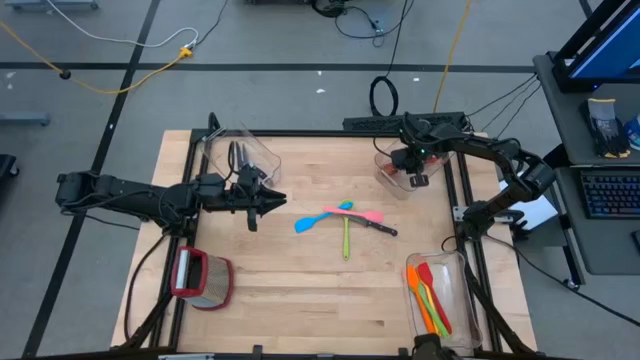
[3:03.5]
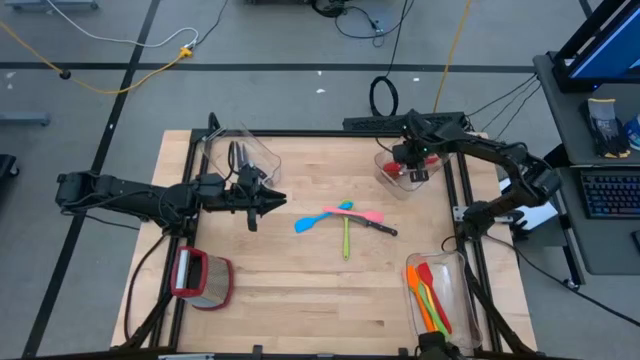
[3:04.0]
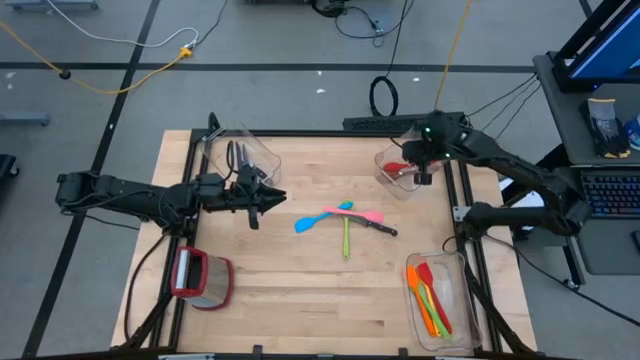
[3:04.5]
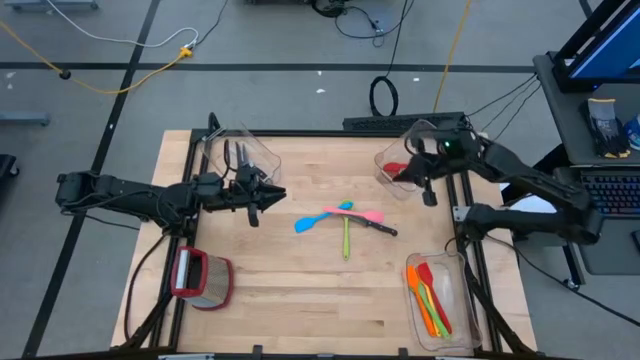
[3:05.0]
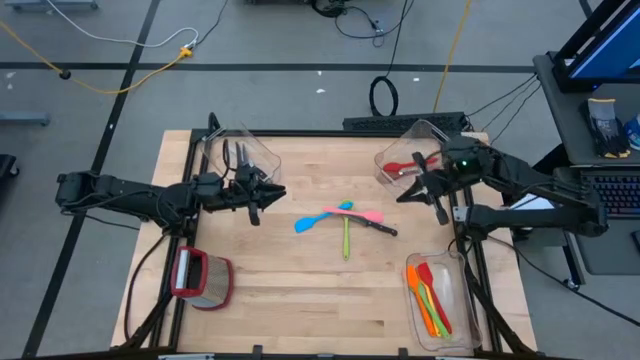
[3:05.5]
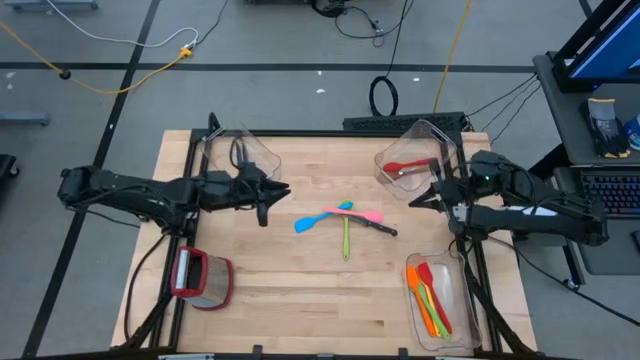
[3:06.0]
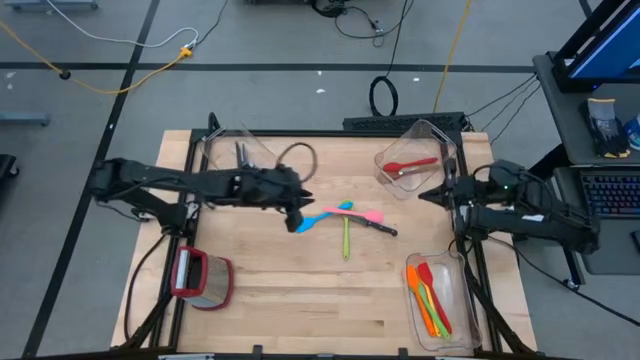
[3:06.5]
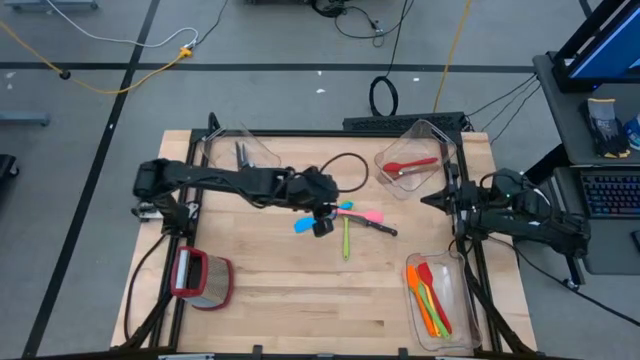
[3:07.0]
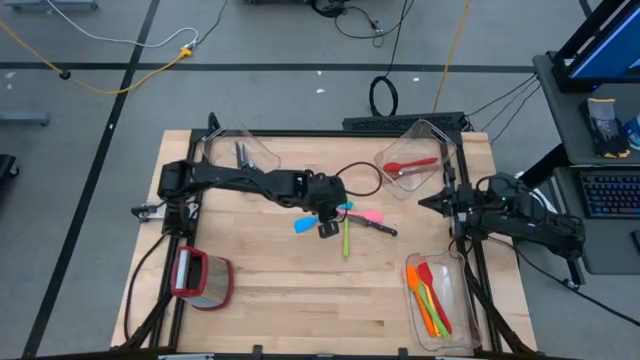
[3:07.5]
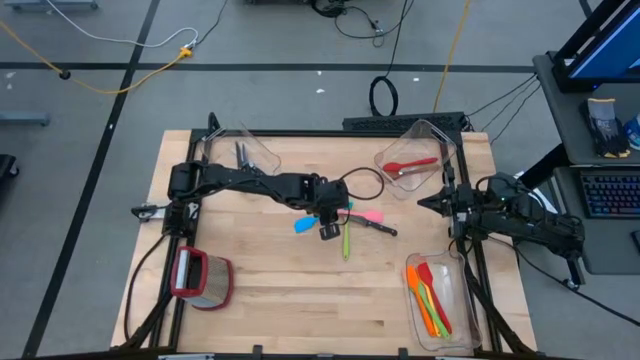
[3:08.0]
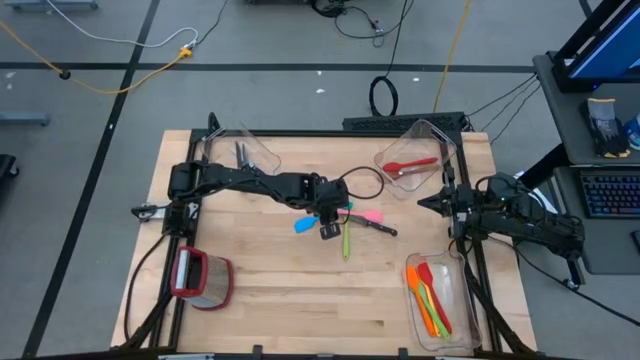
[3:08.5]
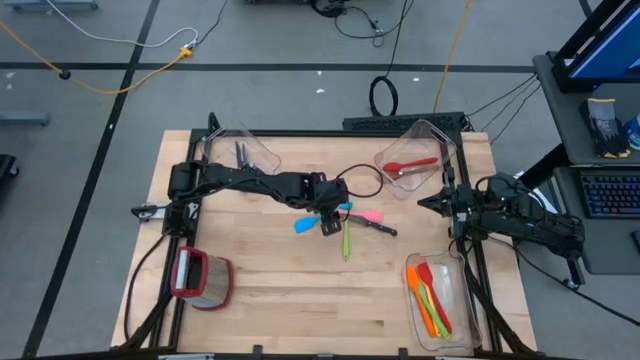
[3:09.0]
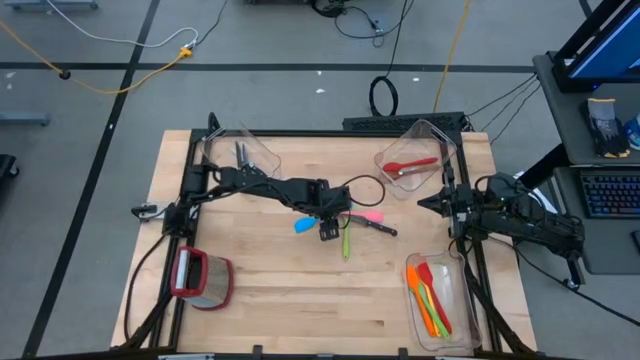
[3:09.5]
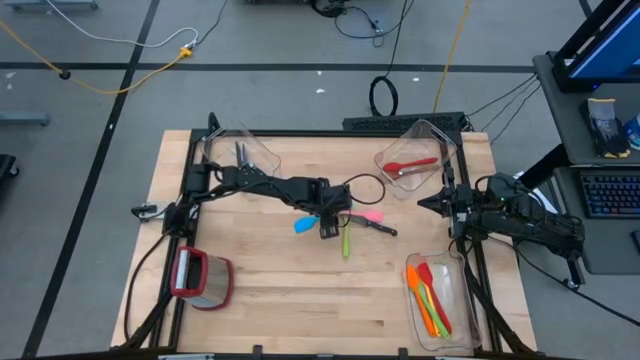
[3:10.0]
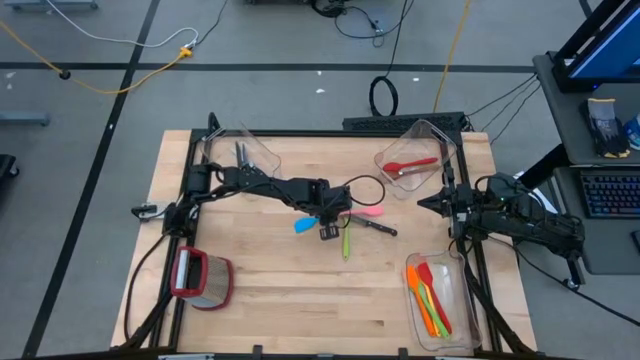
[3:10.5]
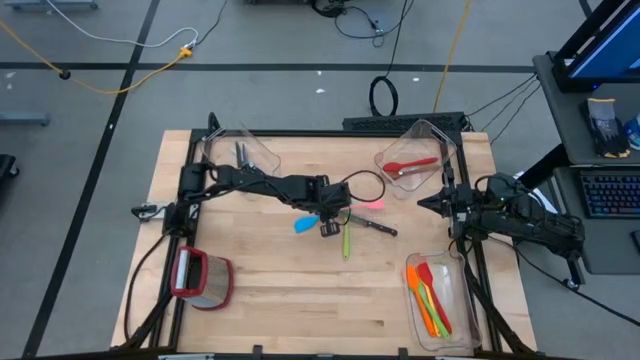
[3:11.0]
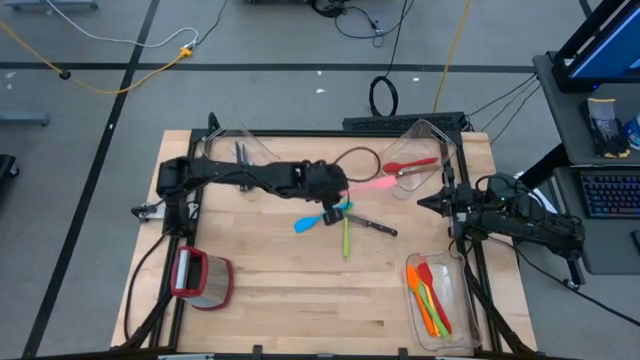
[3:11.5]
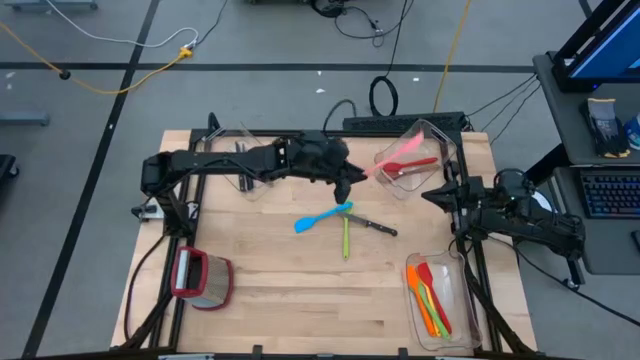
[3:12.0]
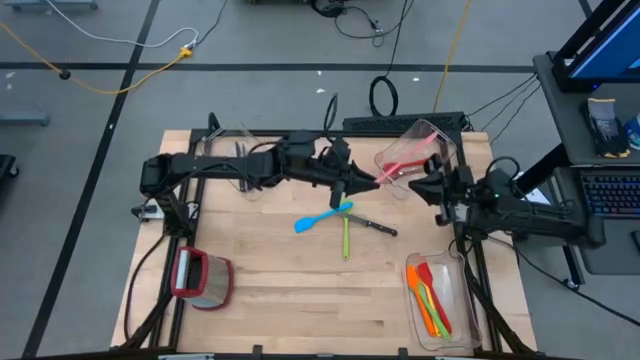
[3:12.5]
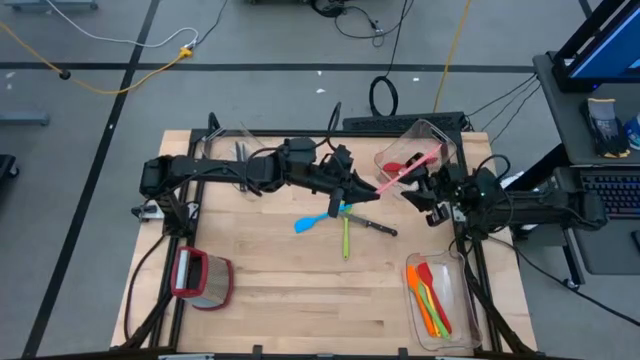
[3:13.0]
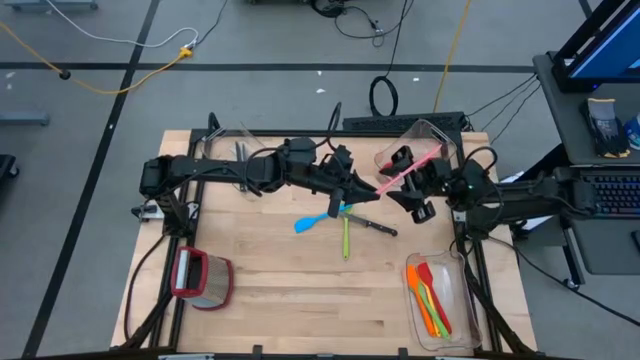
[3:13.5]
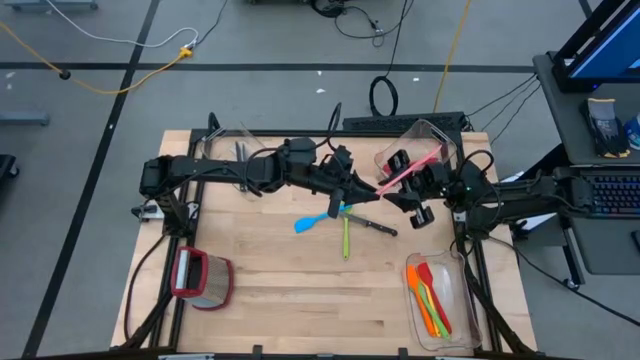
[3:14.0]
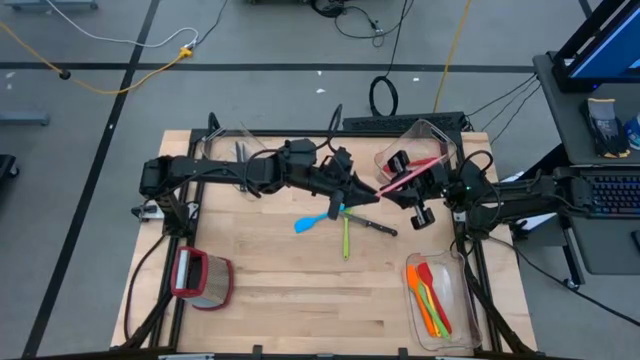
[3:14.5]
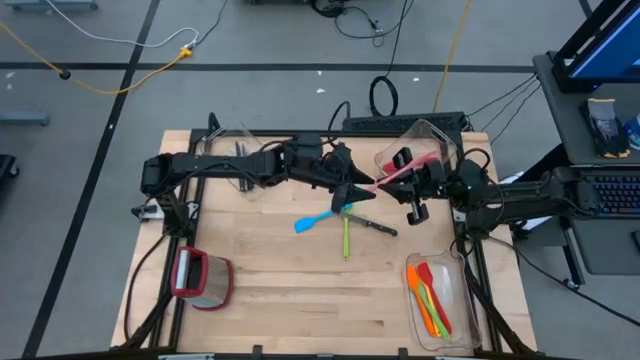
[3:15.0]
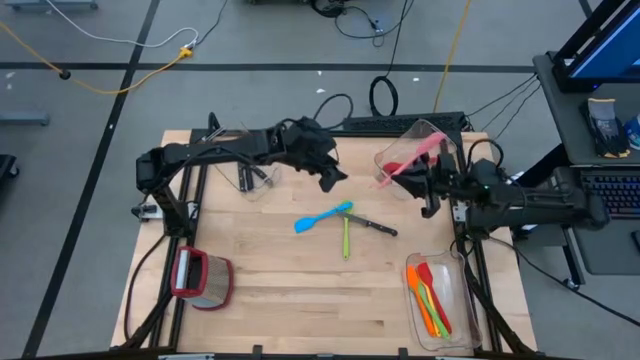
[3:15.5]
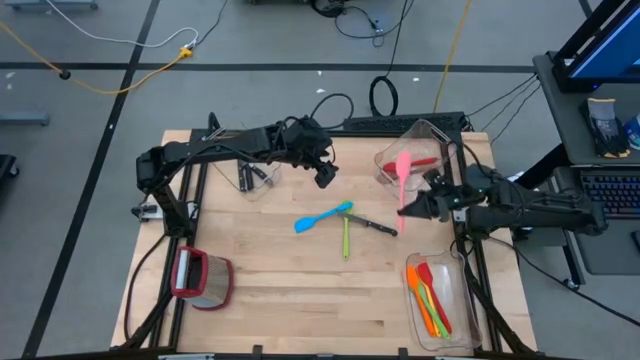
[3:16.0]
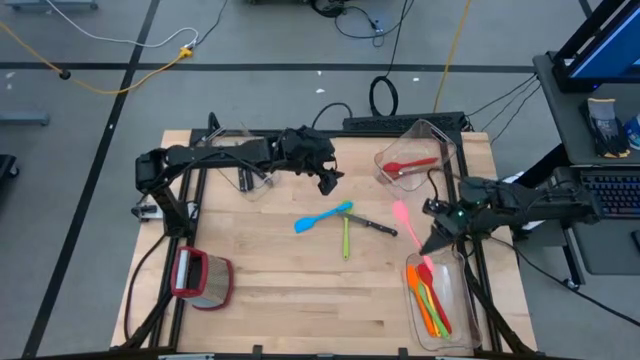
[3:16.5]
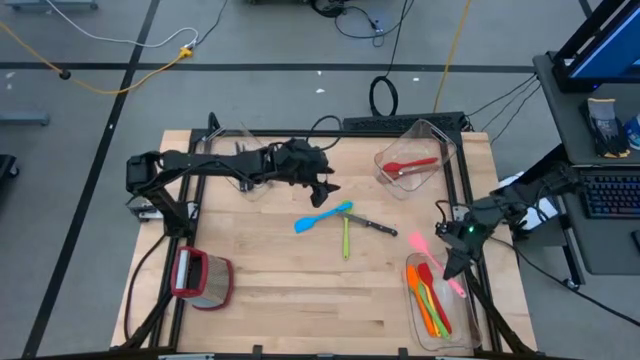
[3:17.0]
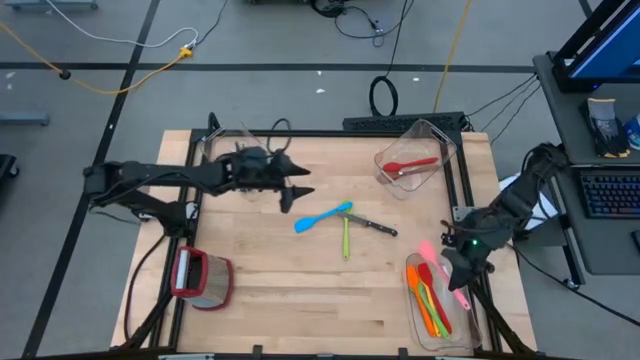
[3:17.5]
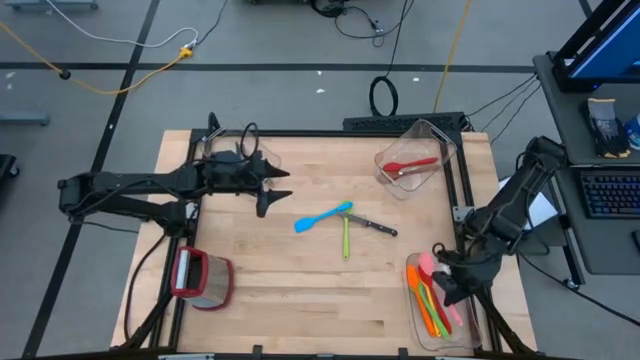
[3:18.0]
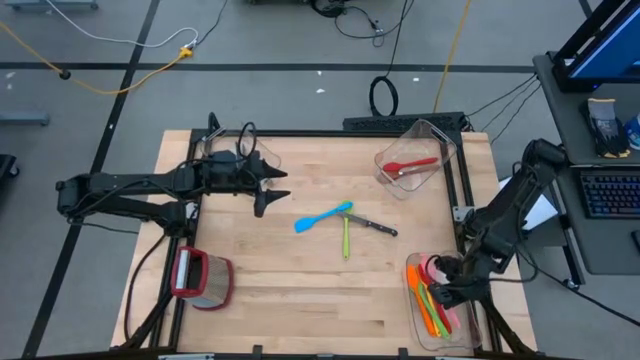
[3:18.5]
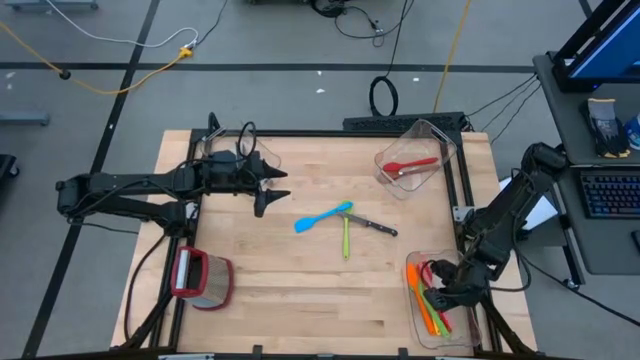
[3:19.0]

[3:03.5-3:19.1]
Task: Pick & Place Kitchen Items
Put the pink spatula into the bottom transparent bin

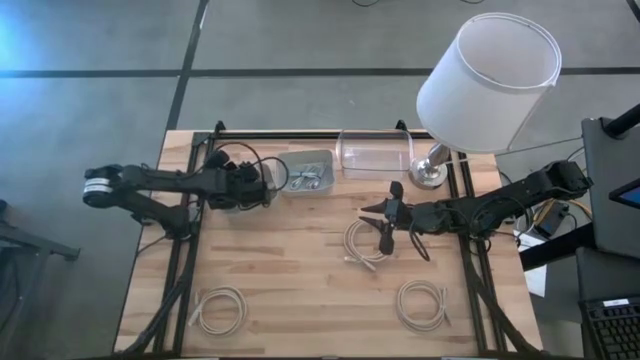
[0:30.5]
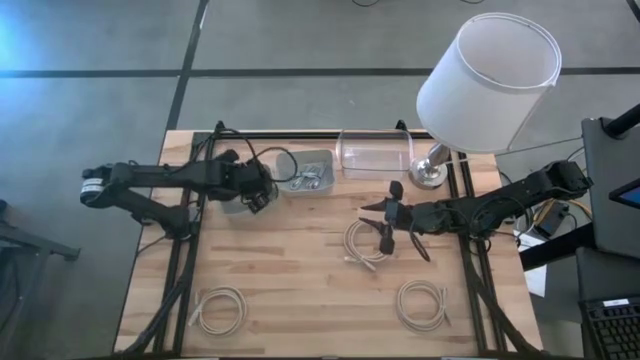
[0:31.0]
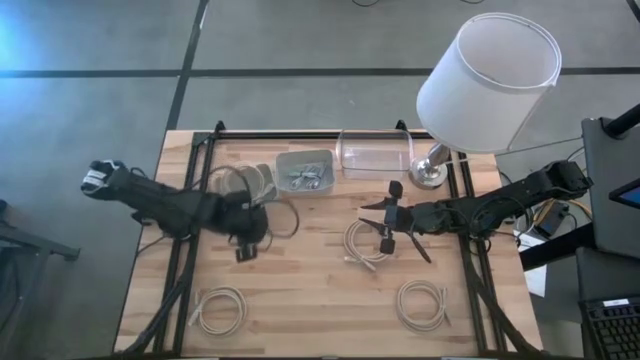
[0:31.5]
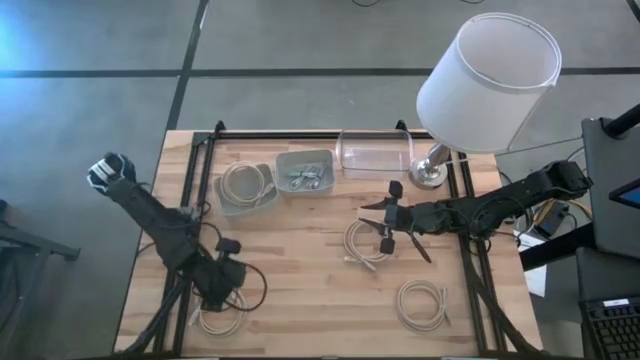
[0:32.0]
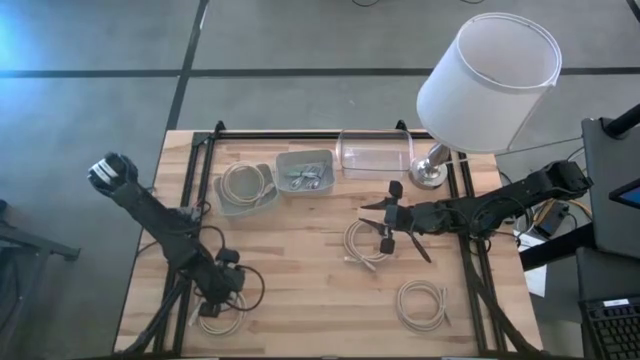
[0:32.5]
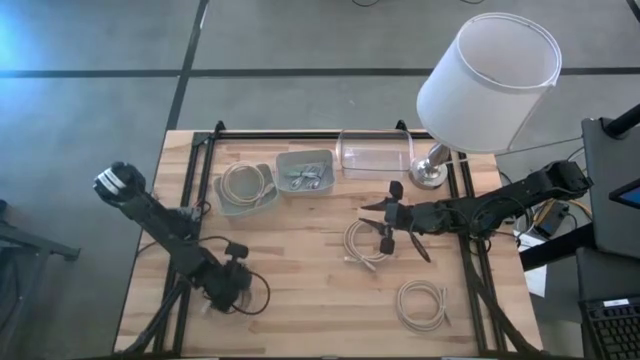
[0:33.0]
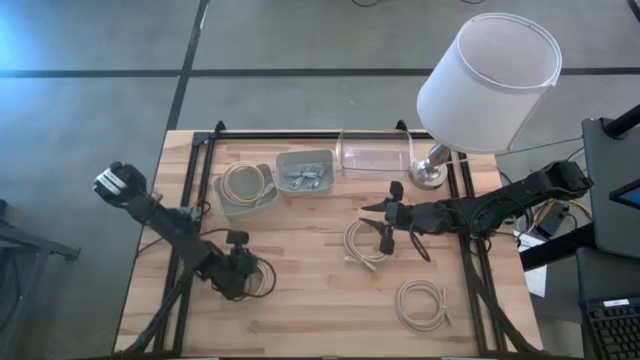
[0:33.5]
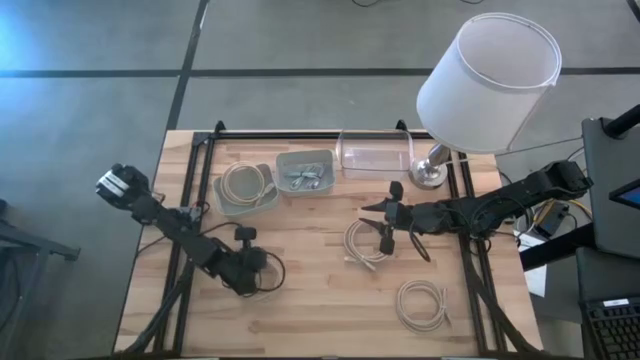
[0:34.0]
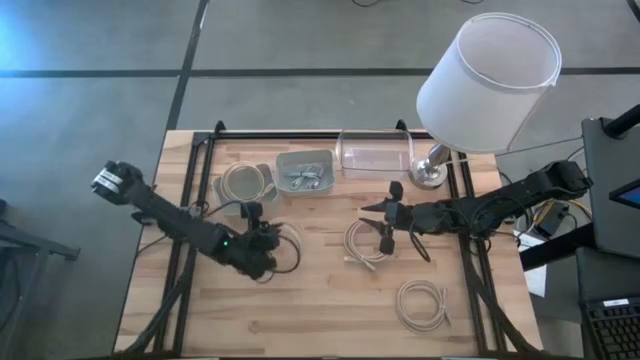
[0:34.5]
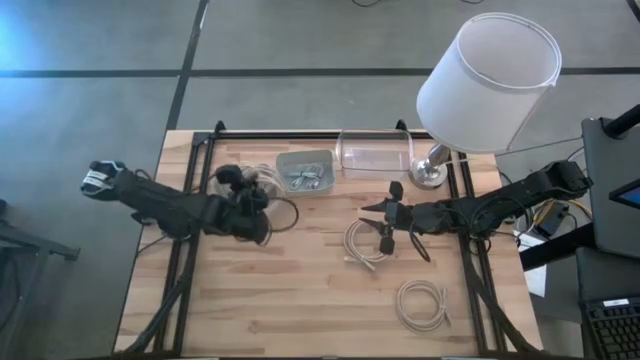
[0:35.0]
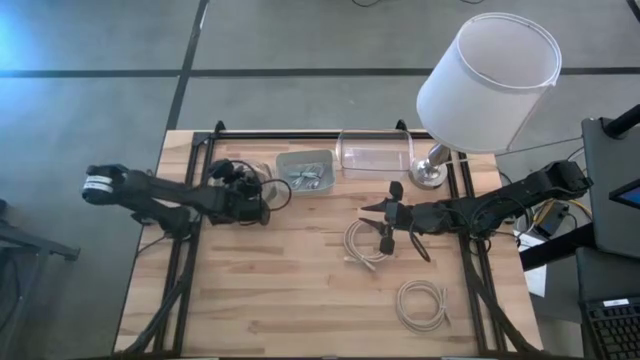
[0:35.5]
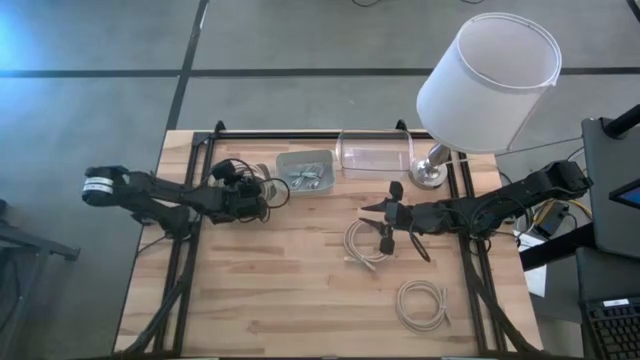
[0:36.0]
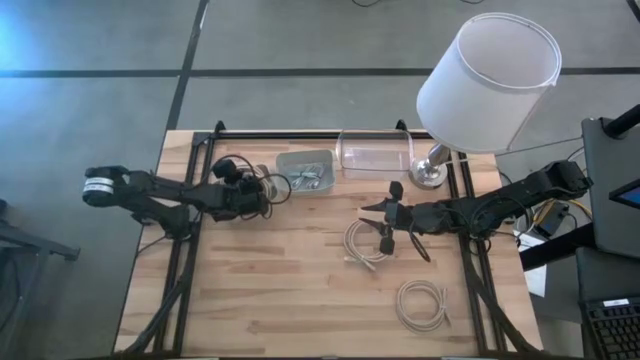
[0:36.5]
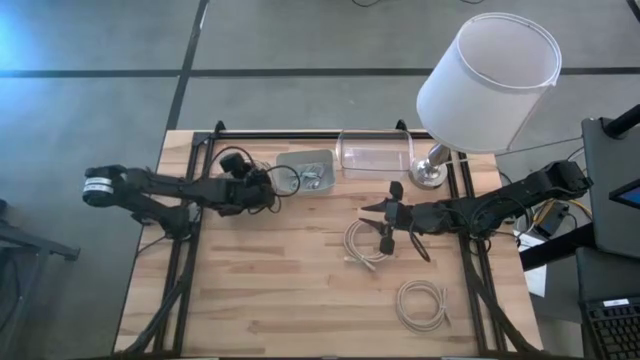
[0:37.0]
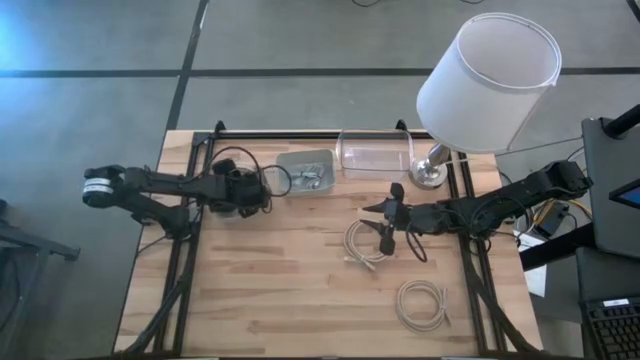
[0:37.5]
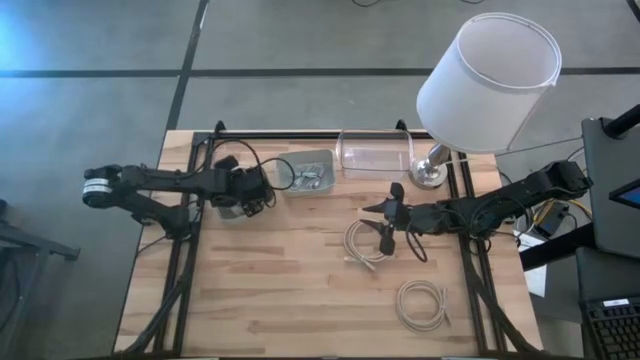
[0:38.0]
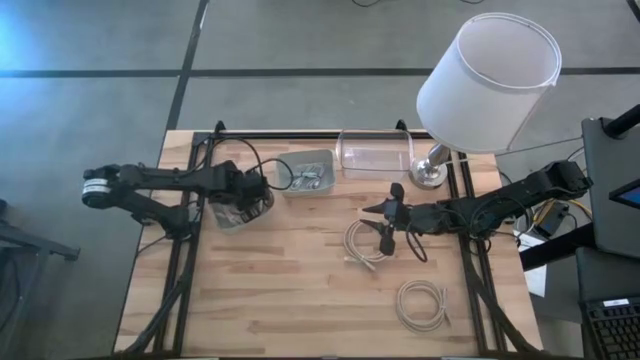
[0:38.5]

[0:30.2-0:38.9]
Task: Pick & Place USB Port
Put the light brown HDMI cable into the left gray bin
